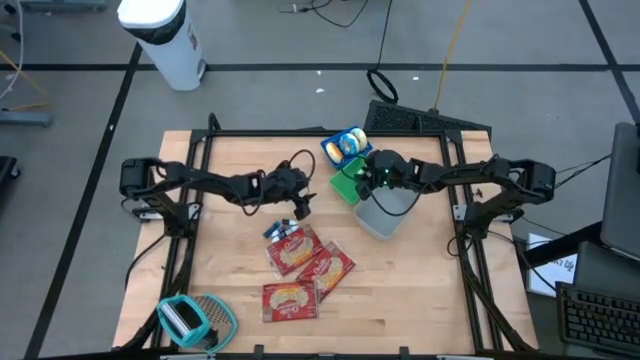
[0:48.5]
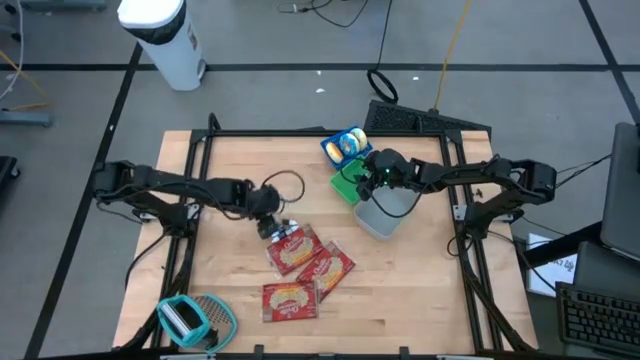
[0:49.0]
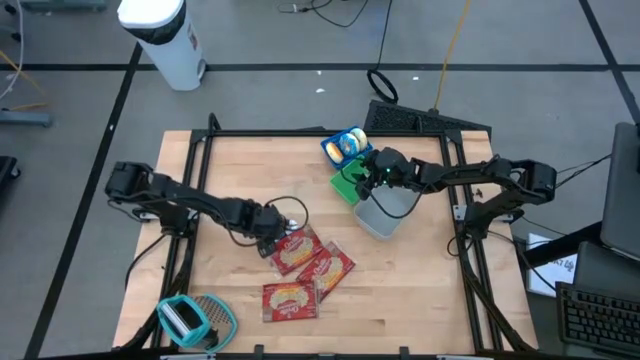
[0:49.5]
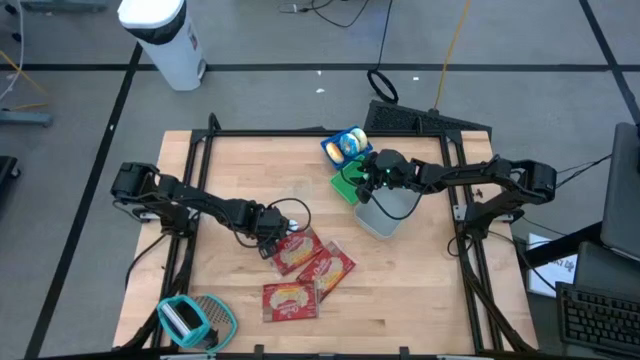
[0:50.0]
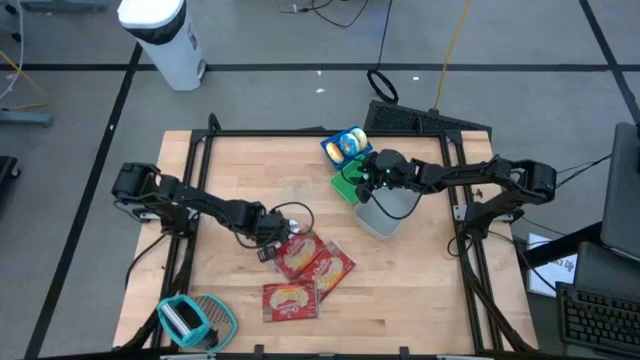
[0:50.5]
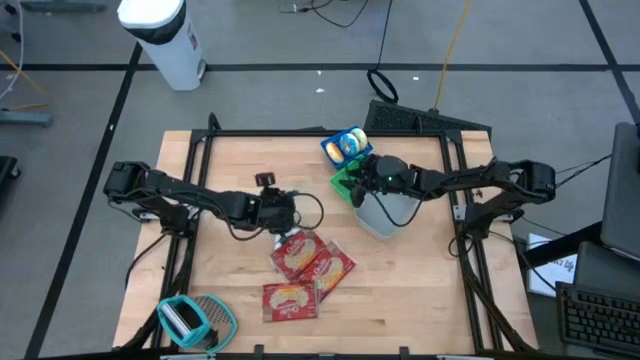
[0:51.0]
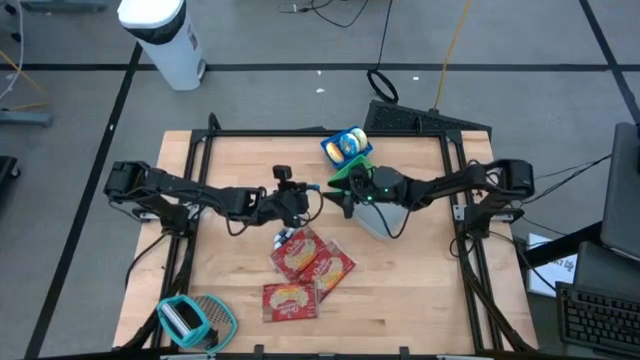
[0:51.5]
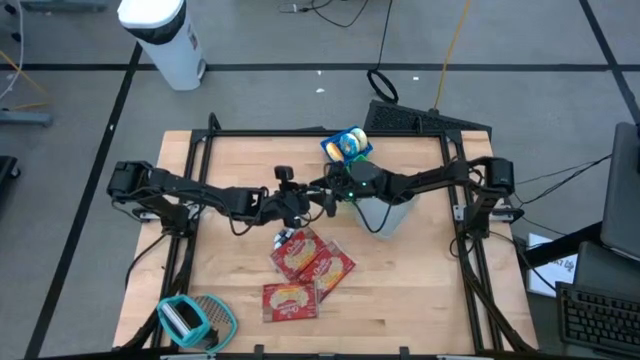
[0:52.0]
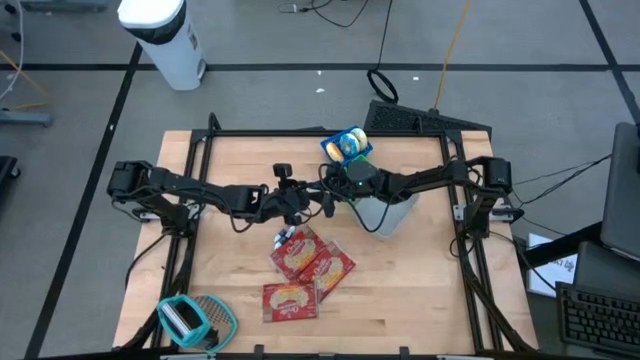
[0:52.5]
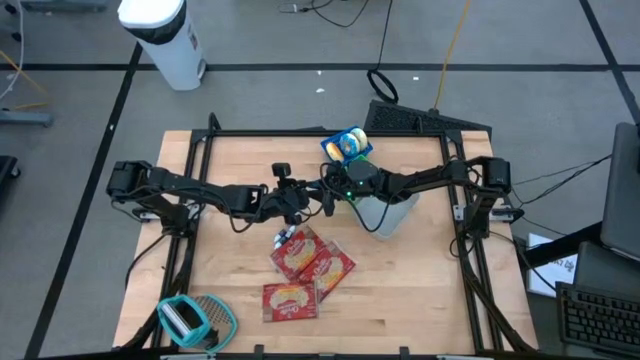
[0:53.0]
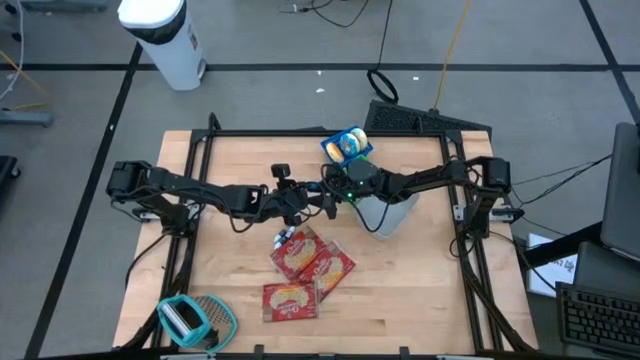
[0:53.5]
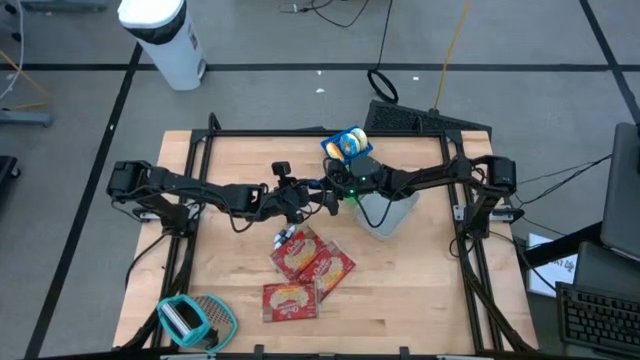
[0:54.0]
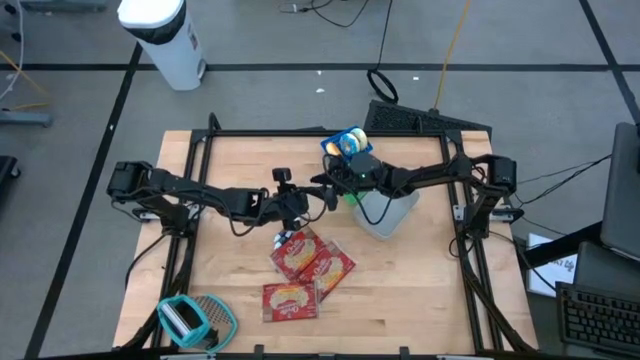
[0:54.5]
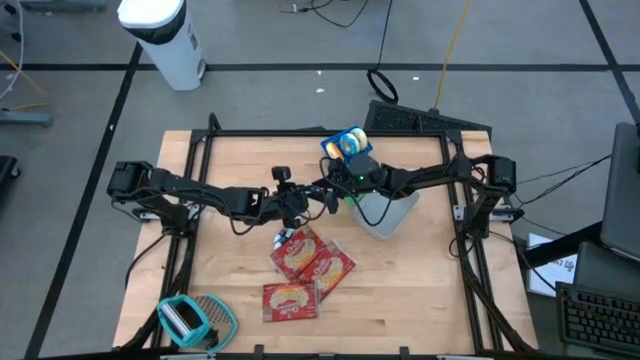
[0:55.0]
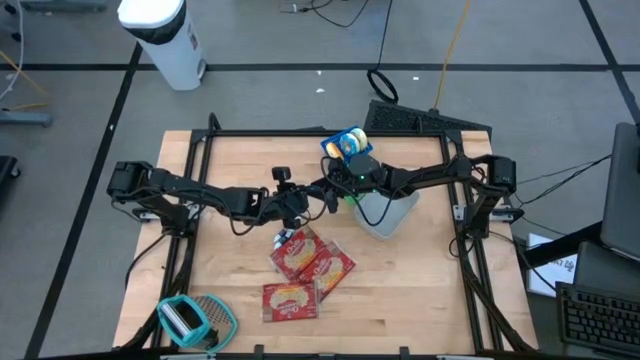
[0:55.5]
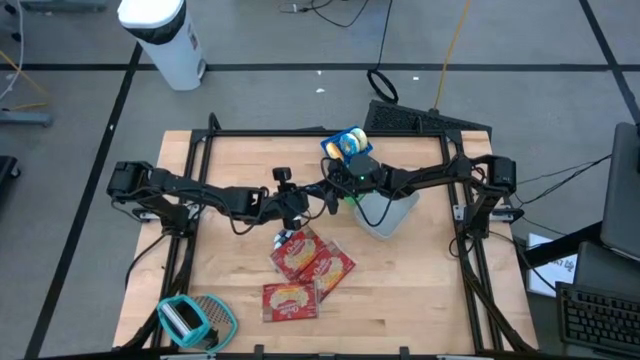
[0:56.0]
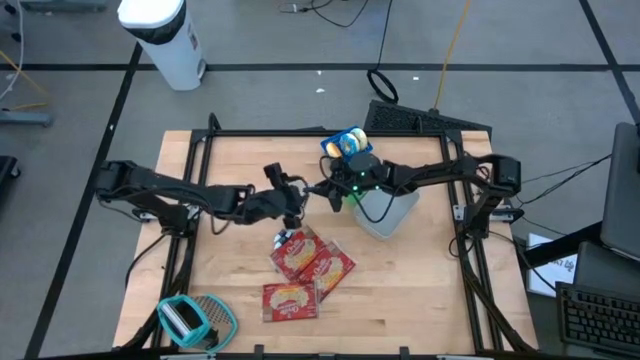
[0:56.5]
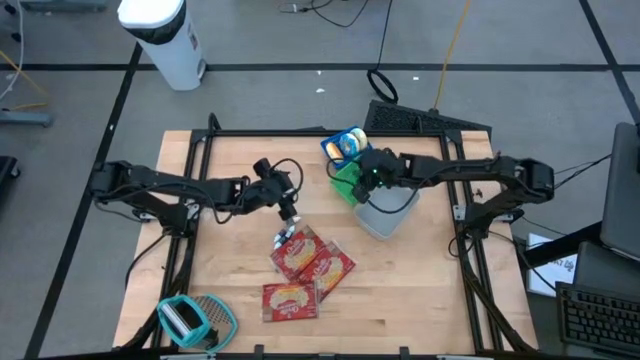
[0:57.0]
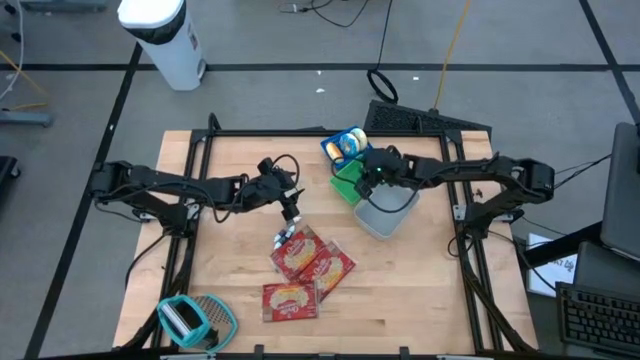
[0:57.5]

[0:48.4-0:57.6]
Put the large blue food coloring bottle into the green bin

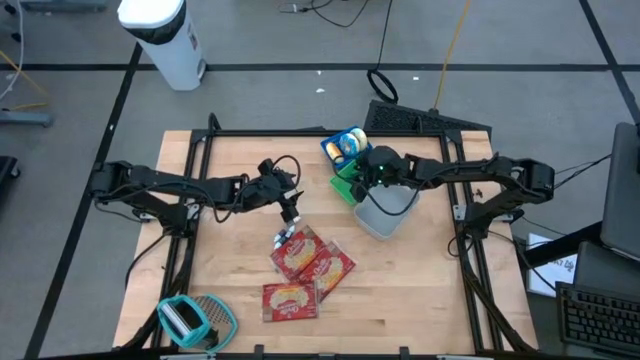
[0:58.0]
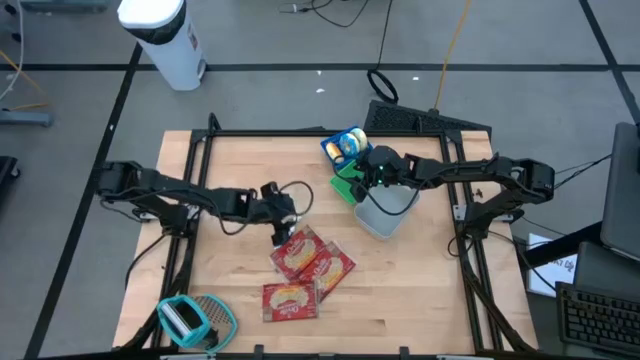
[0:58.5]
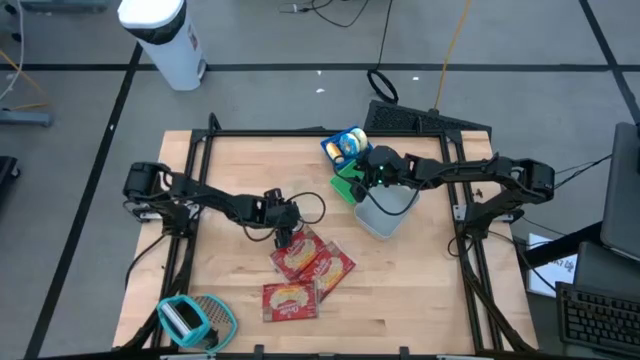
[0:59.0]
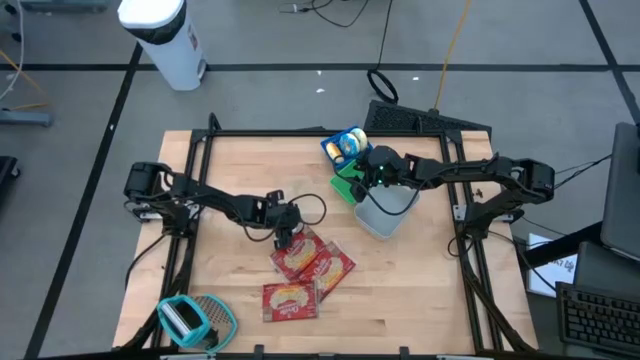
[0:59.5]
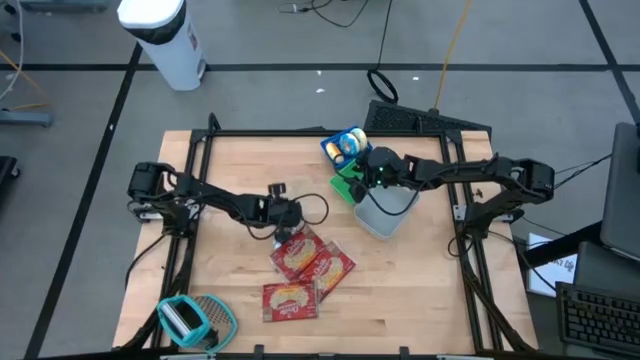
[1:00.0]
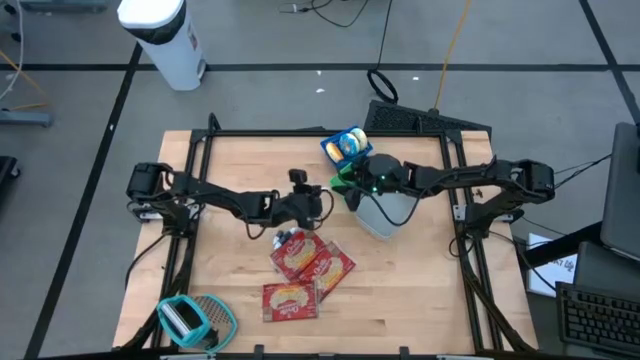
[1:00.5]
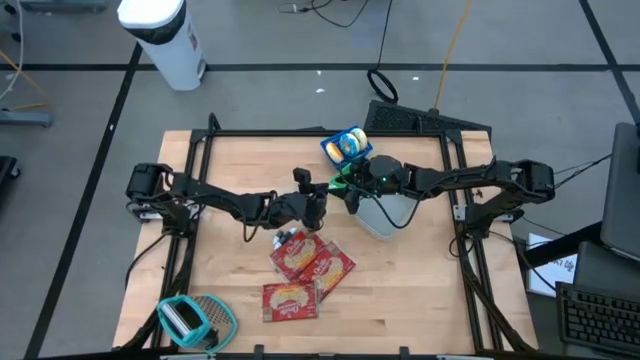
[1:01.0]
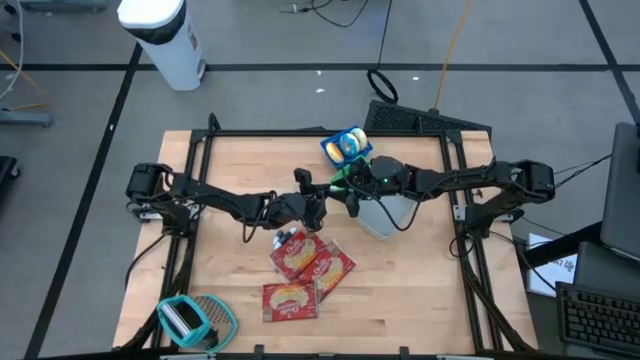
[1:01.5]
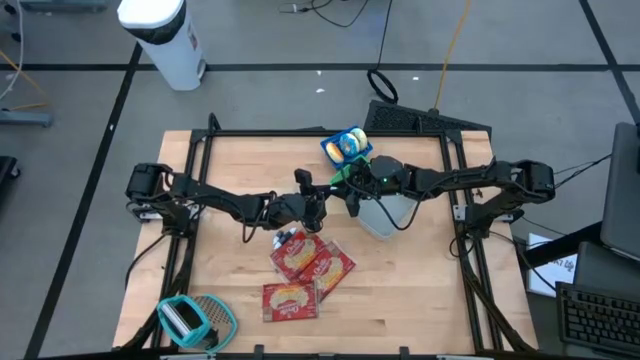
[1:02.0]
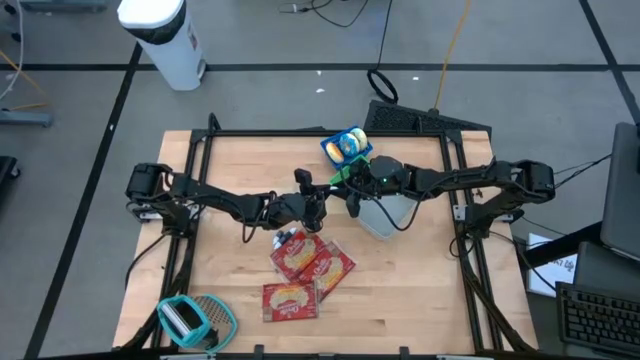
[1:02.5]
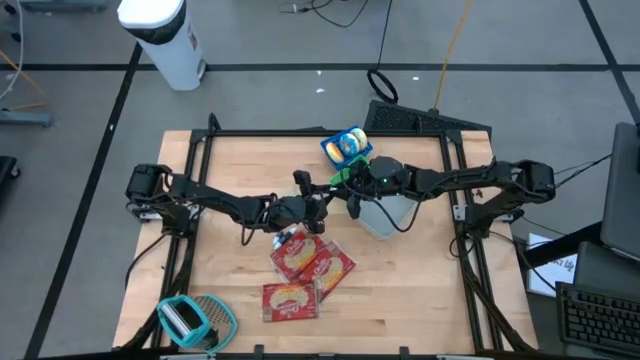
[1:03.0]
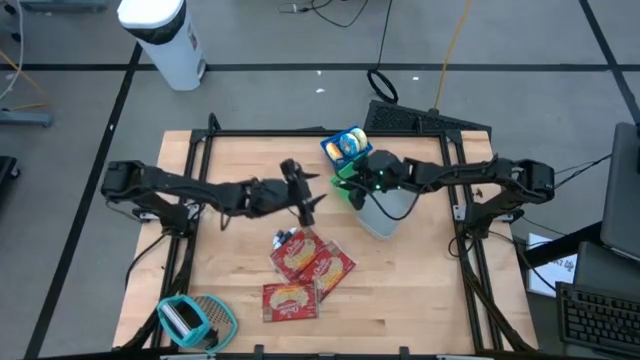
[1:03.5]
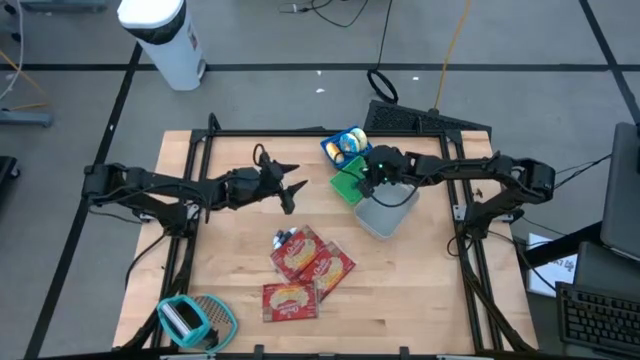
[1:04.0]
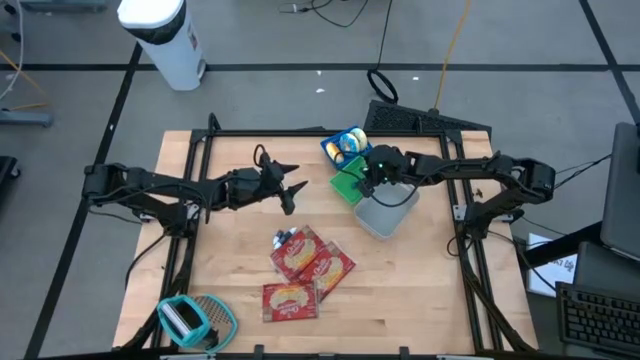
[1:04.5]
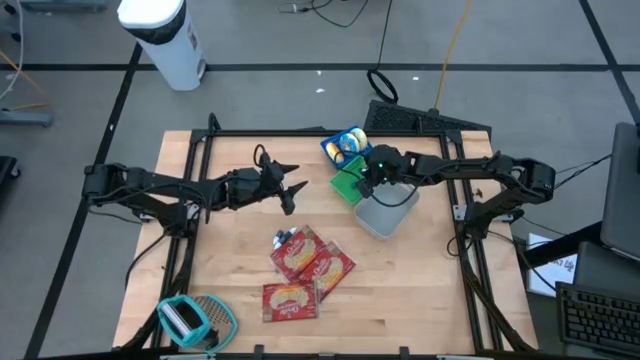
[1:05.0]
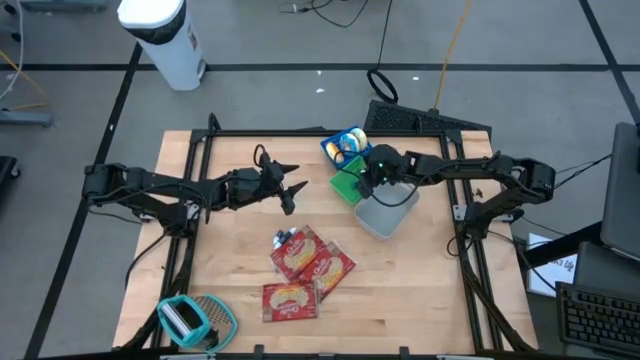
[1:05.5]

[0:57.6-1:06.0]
Put the small brown food coloring bottle into the green bin

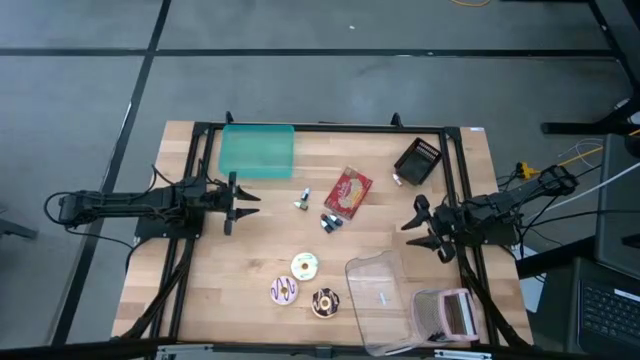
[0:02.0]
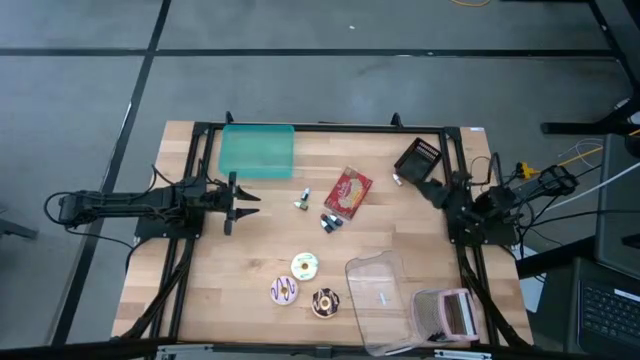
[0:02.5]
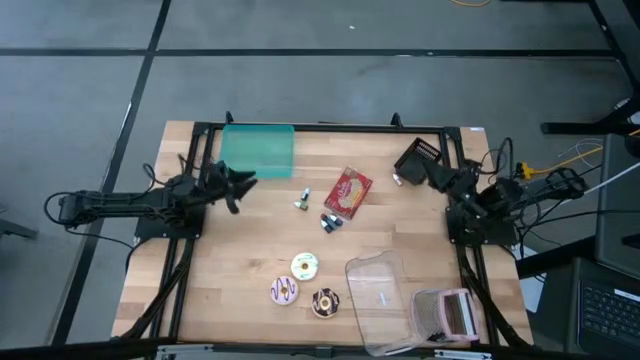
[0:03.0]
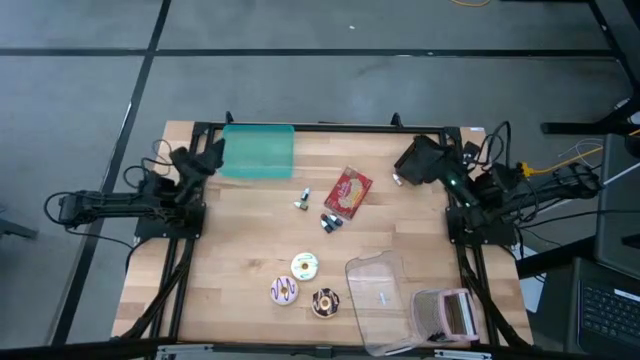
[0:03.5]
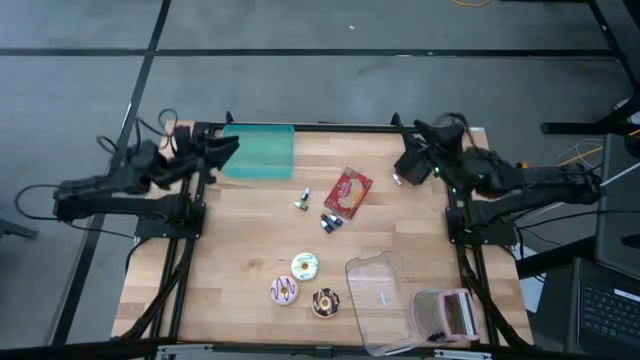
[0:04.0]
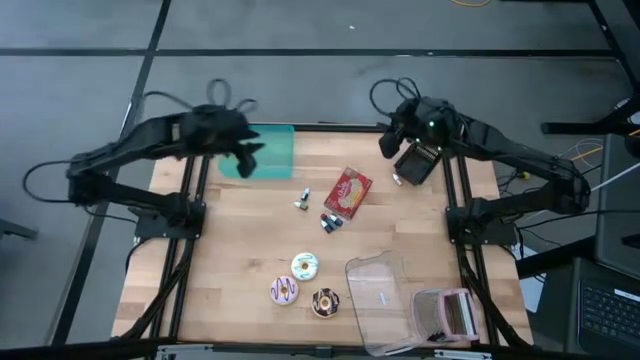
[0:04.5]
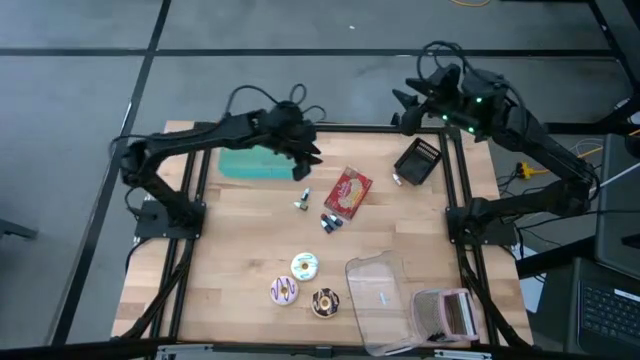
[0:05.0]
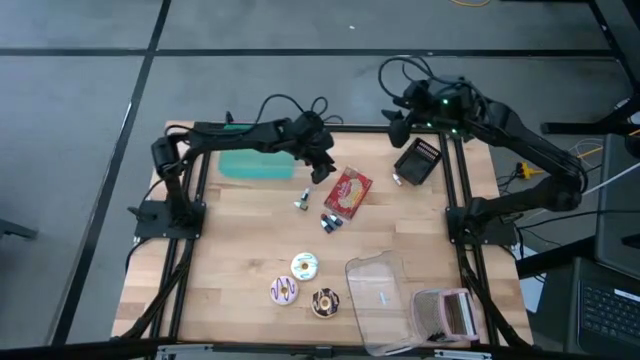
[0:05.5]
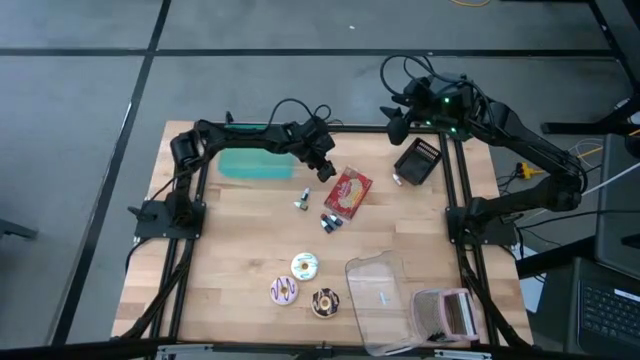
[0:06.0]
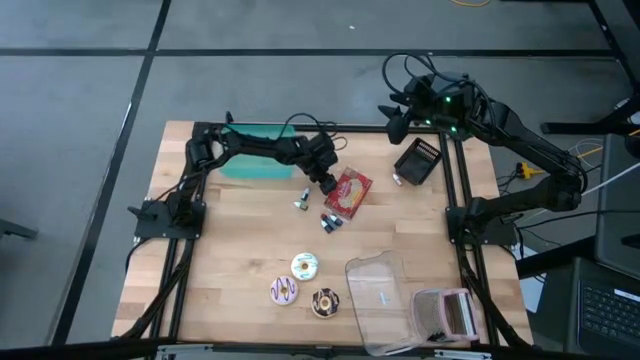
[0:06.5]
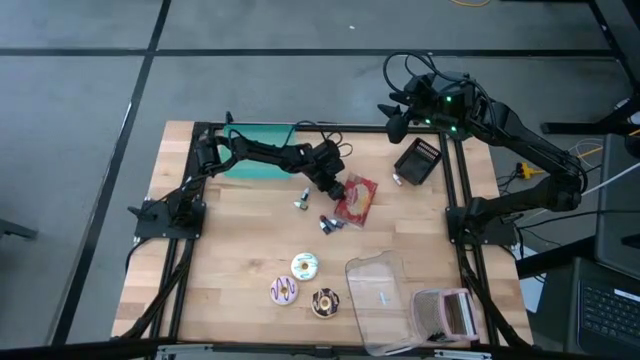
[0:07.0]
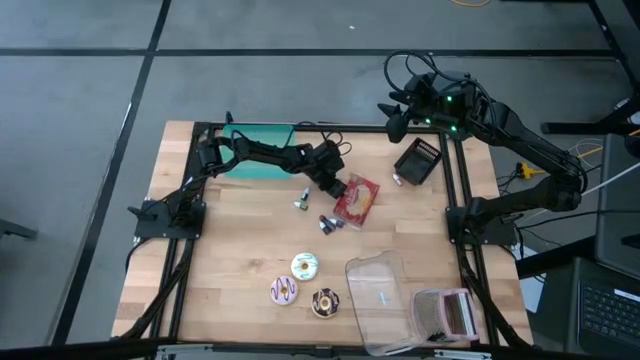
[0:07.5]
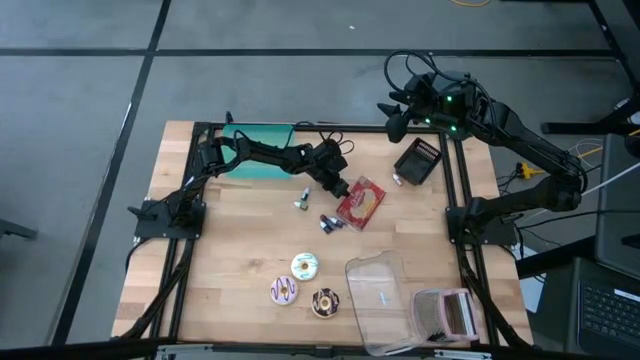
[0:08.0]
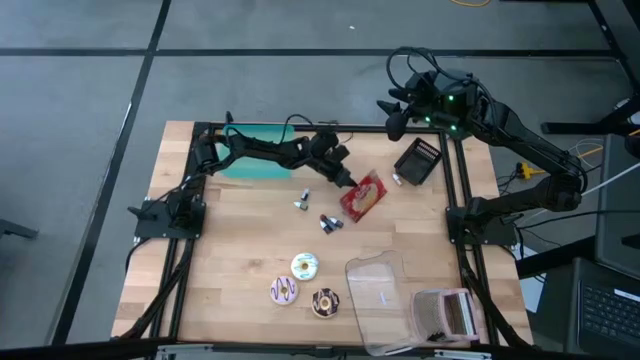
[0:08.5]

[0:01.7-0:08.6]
Put the popcorn bag into the light blue bin
